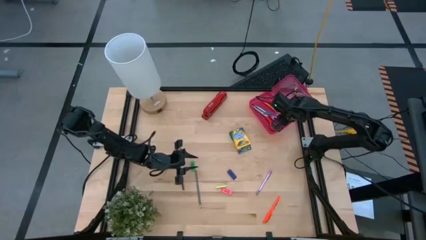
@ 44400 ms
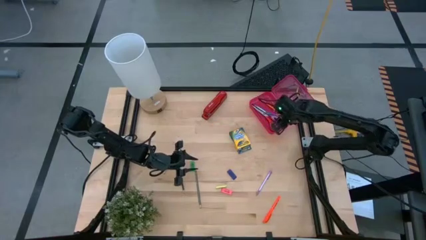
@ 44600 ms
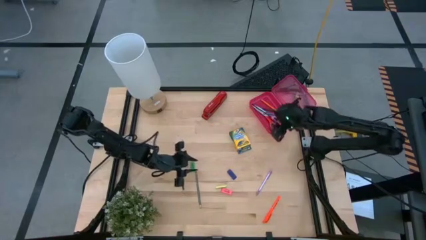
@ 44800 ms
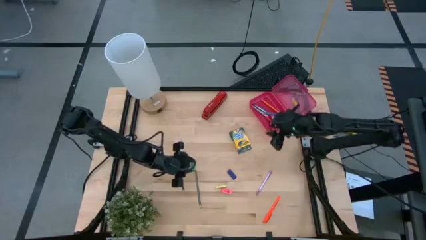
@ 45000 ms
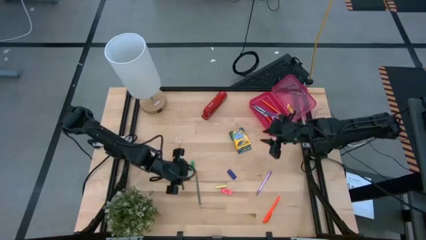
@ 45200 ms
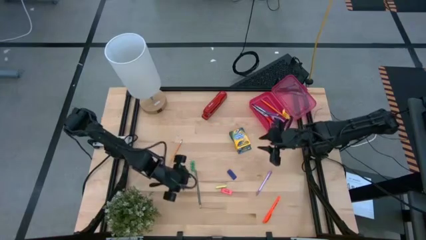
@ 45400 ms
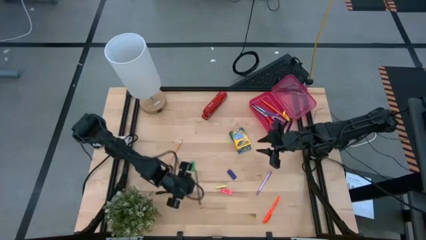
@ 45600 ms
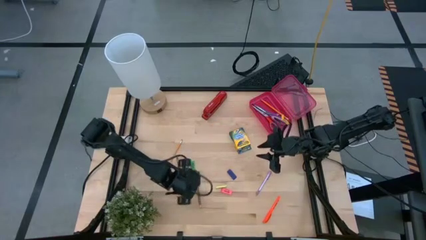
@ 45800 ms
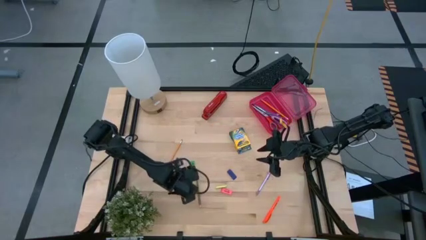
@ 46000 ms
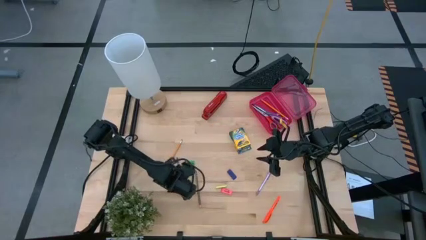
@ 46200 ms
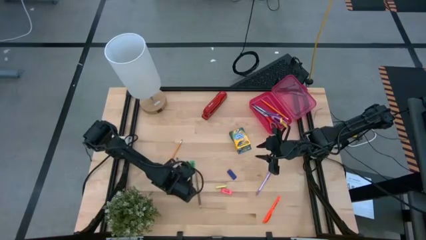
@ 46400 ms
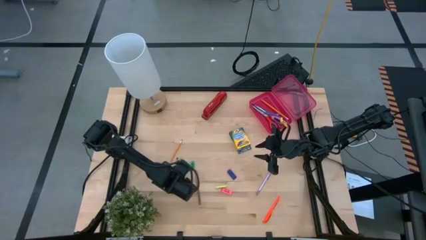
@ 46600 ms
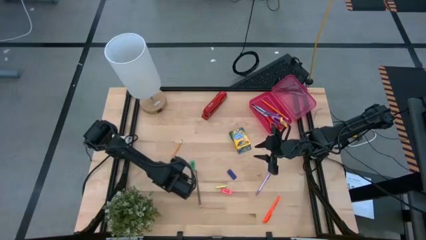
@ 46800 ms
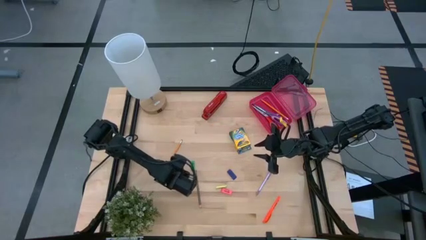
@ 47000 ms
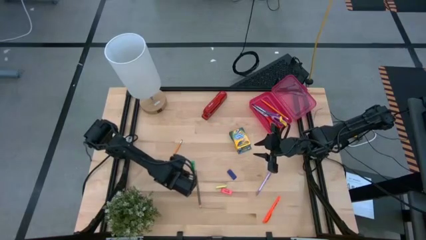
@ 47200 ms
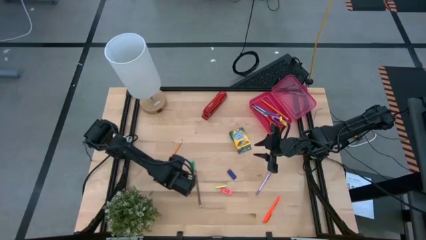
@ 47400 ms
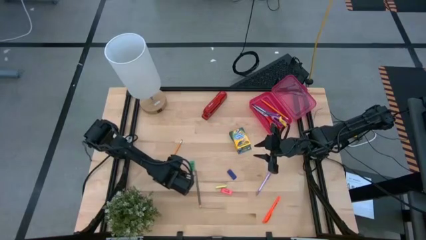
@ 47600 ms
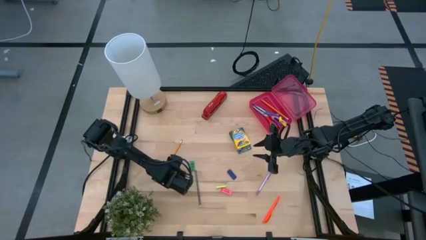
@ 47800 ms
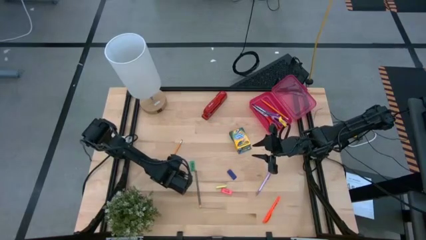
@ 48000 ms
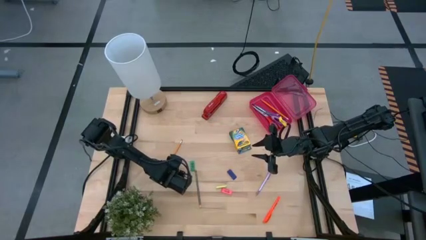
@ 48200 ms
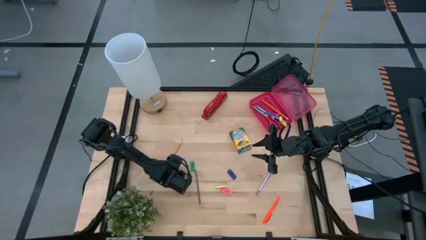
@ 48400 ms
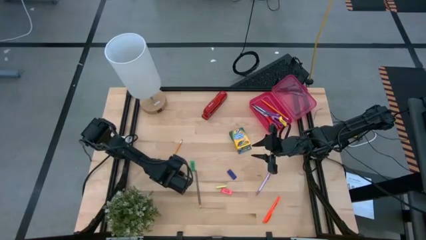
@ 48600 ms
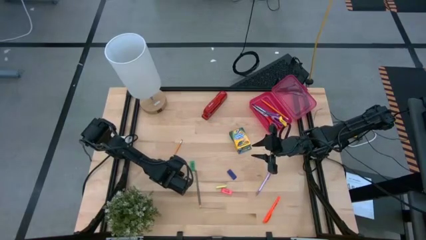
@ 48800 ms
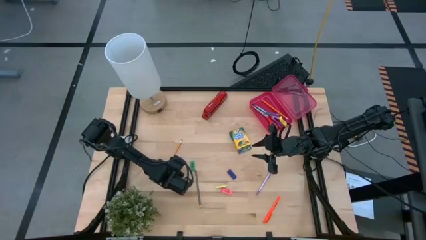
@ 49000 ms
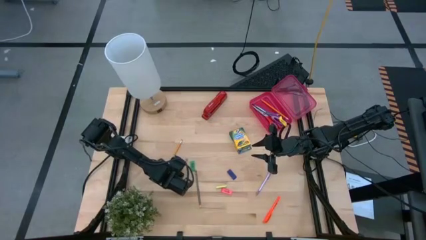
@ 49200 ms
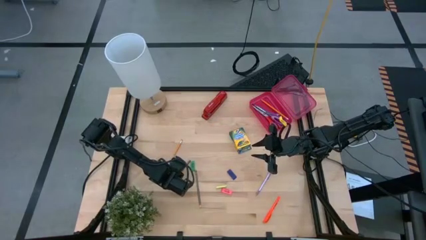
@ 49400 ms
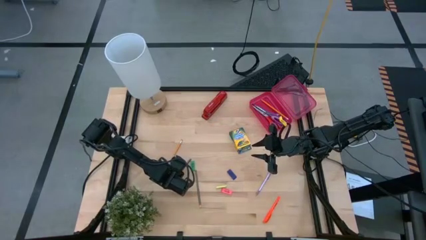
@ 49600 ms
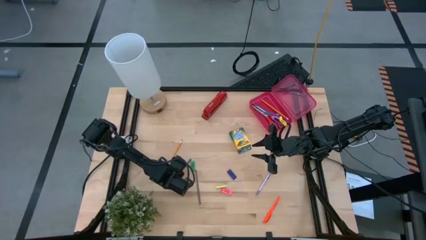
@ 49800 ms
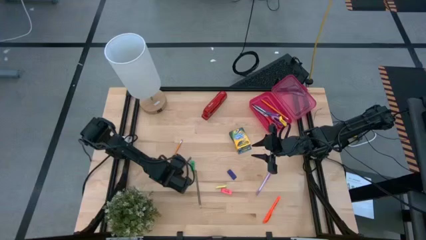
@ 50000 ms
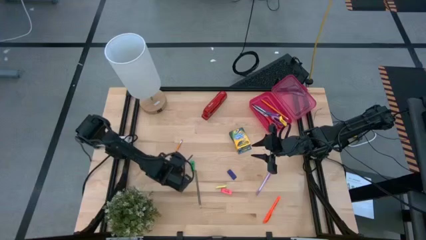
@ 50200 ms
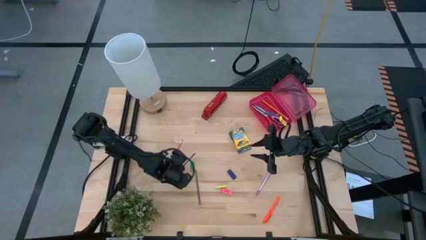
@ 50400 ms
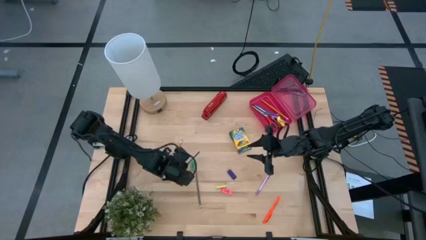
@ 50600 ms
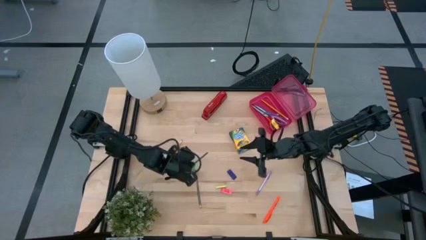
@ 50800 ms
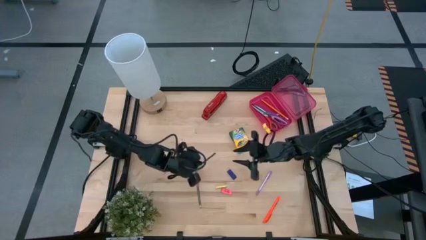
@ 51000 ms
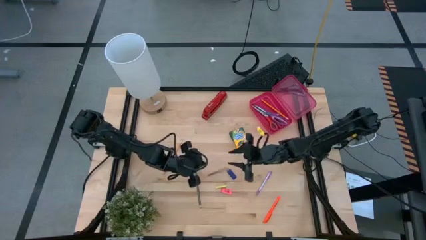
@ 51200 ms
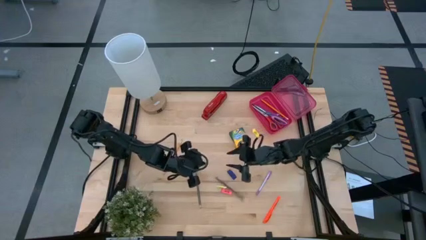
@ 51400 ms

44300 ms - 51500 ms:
Task: Pack school essentials
Put the left black pencil into the pink supply box

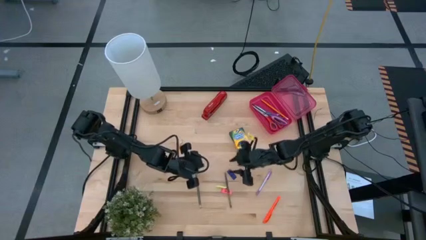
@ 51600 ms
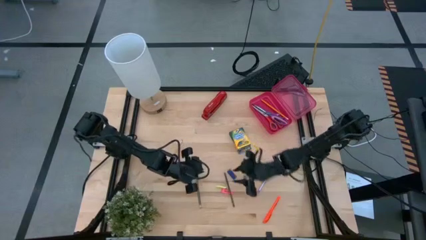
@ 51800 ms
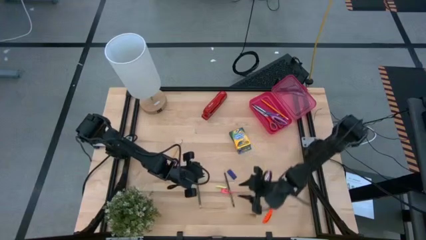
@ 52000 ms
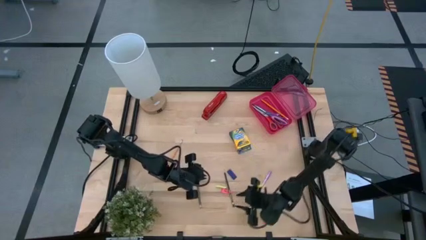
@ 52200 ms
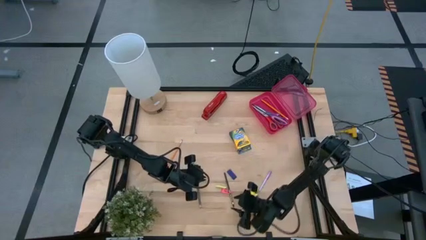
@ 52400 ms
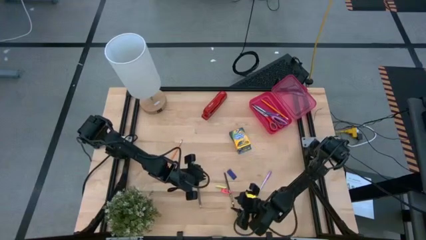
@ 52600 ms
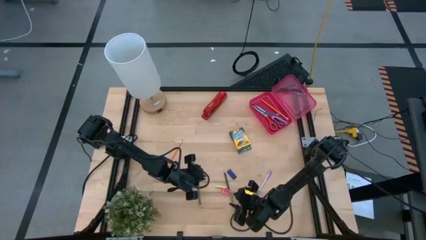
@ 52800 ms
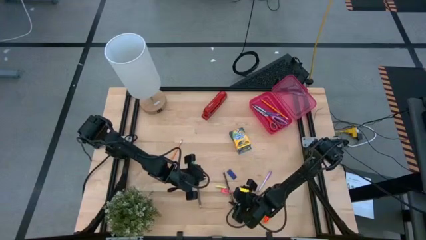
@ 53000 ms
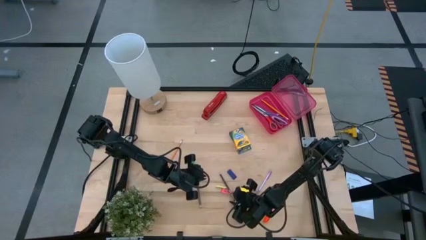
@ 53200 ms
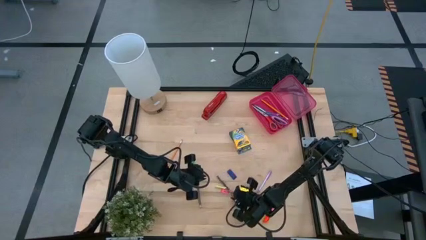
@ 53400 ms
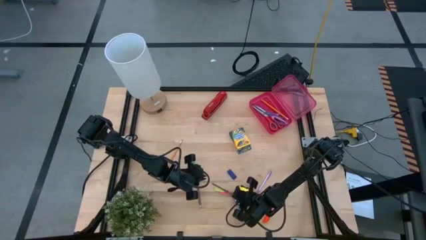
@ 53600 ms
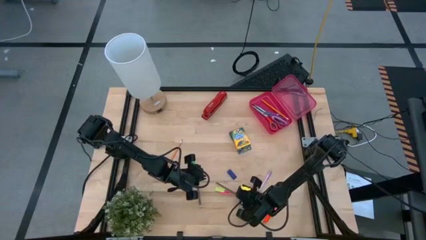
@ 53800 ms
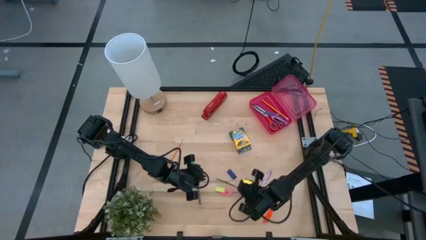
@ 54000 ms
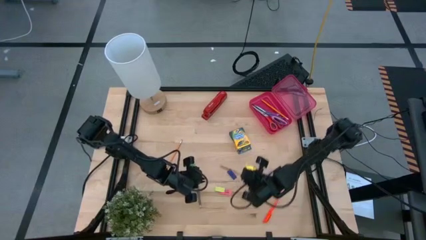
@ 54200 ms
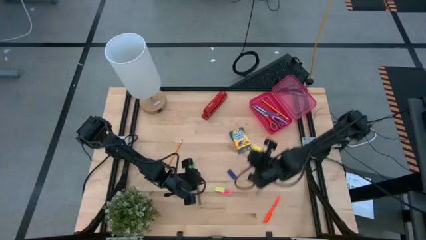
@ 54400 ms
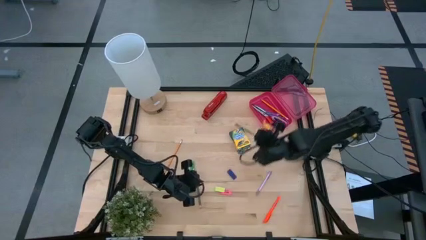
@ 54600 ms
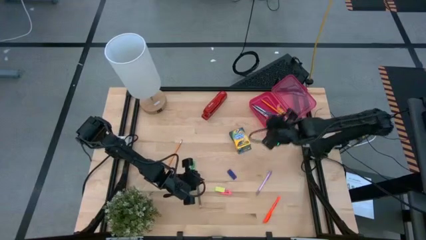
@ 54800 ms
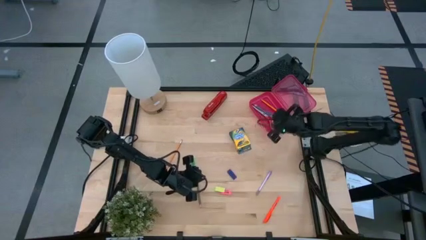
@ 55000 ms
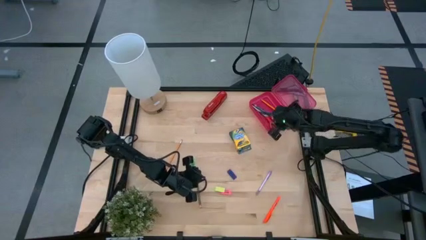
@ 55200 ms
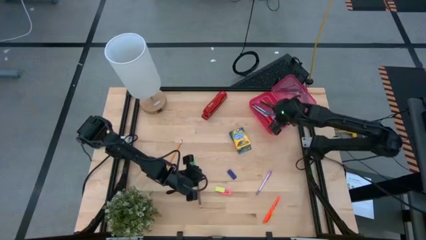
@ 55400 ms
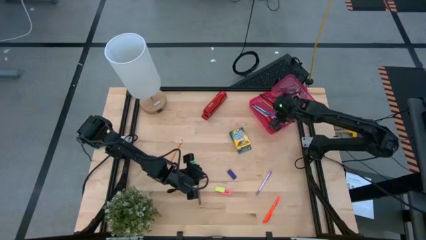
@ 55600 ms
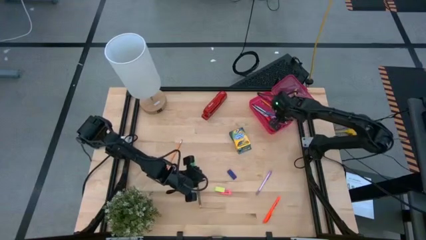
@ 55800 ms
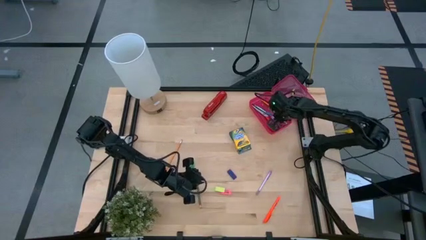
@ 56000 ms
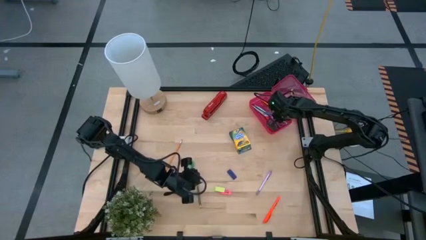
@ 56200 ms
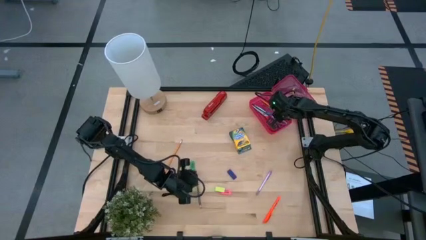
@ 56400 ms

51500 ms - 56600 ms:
Put the right black pencil into the pink supply box
